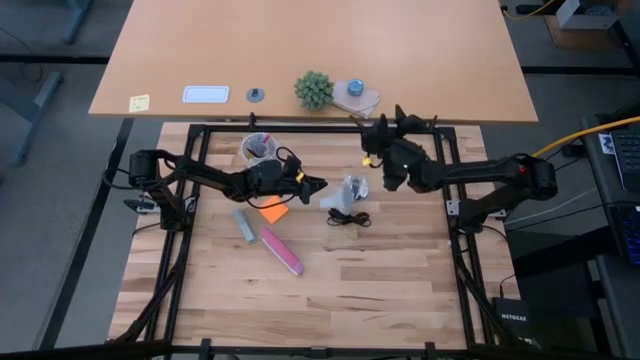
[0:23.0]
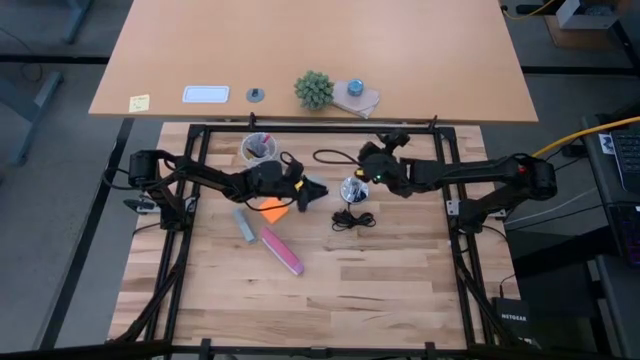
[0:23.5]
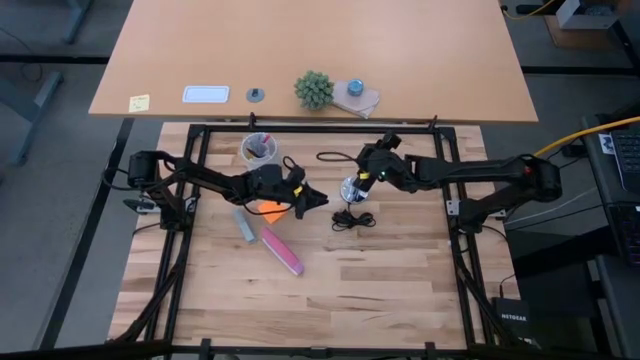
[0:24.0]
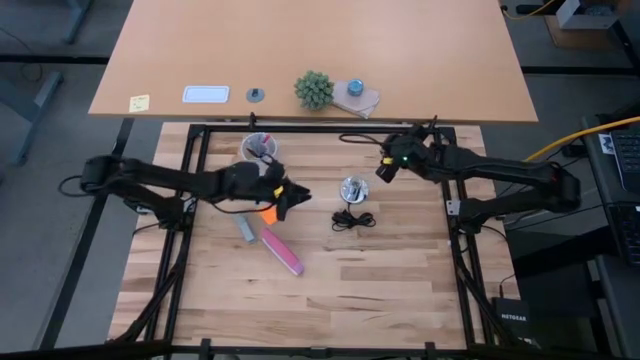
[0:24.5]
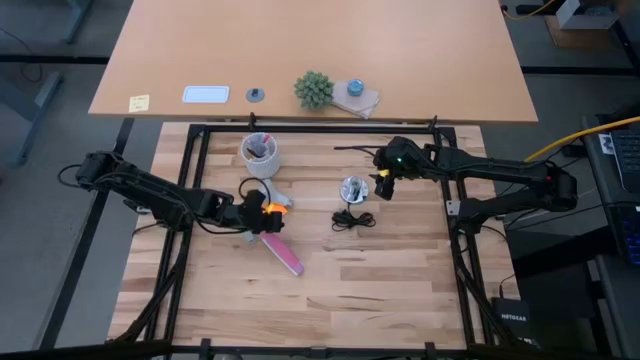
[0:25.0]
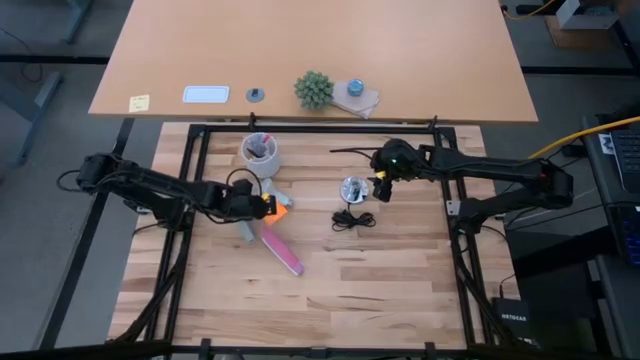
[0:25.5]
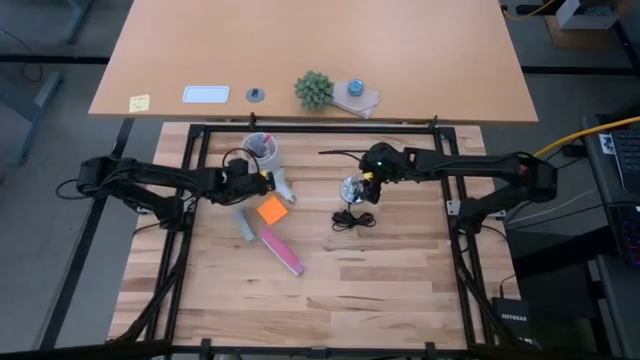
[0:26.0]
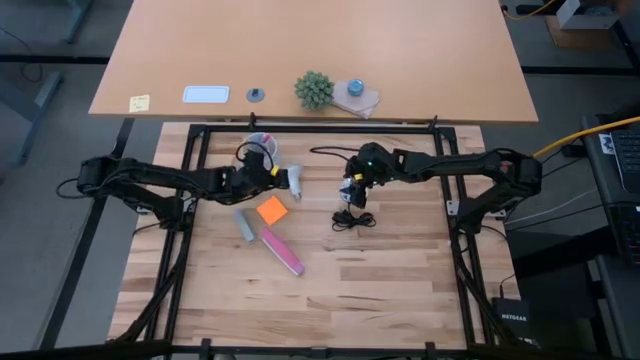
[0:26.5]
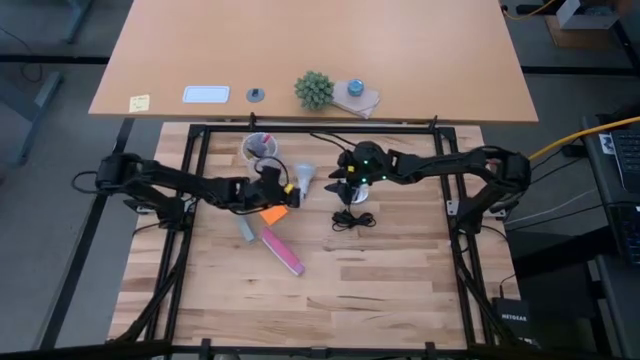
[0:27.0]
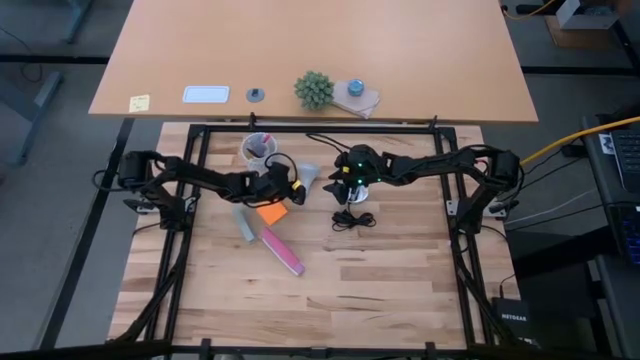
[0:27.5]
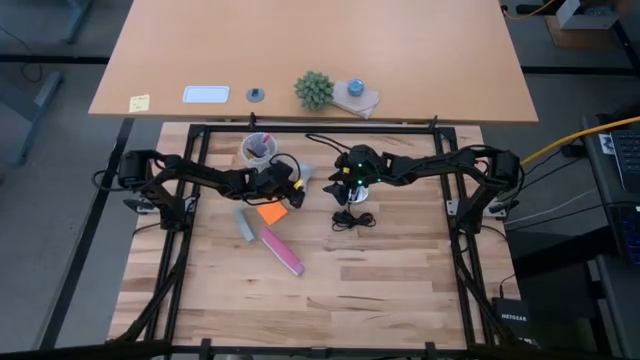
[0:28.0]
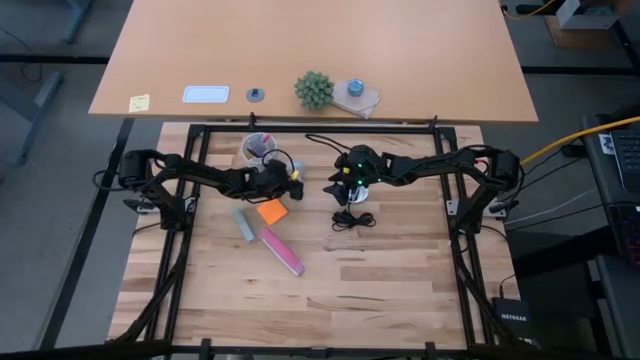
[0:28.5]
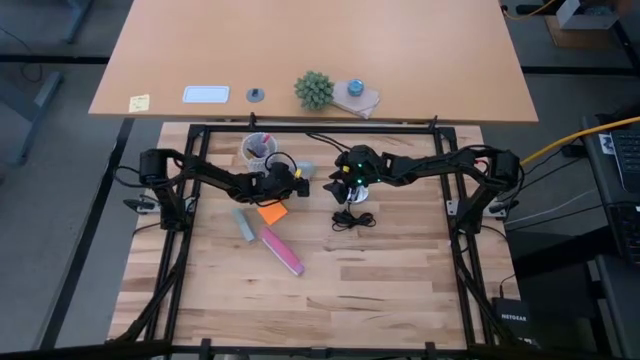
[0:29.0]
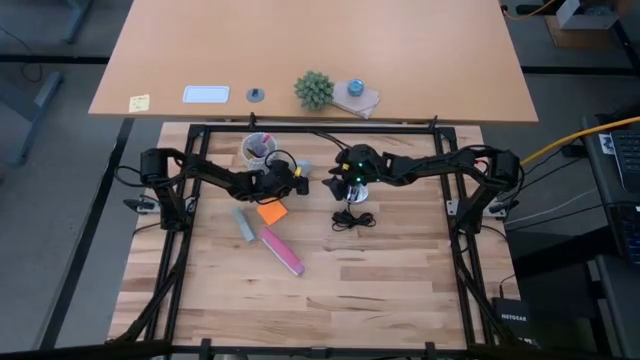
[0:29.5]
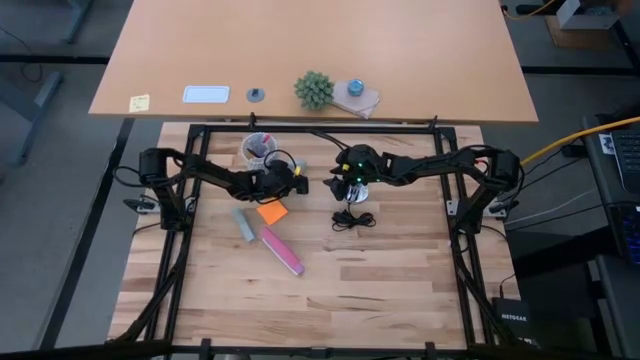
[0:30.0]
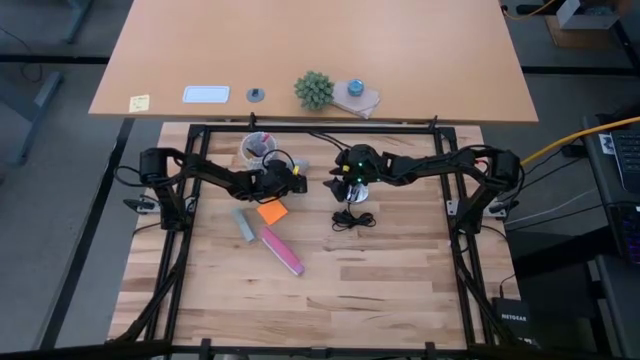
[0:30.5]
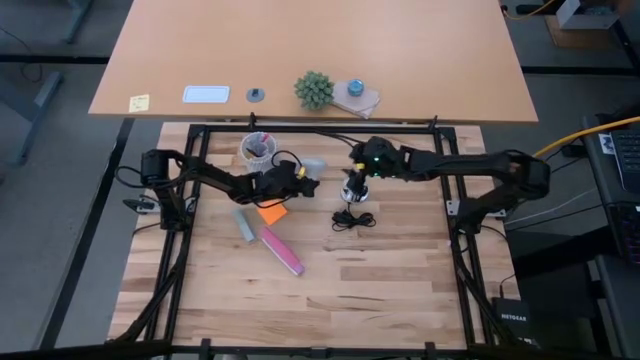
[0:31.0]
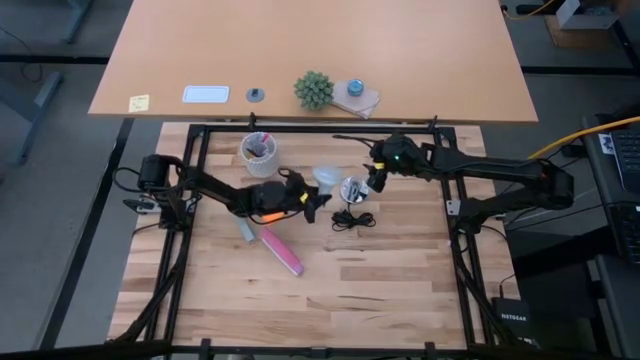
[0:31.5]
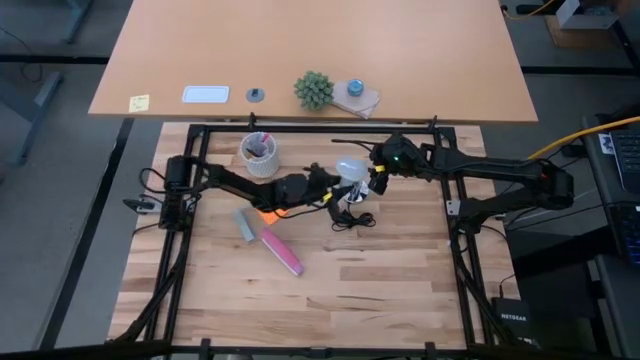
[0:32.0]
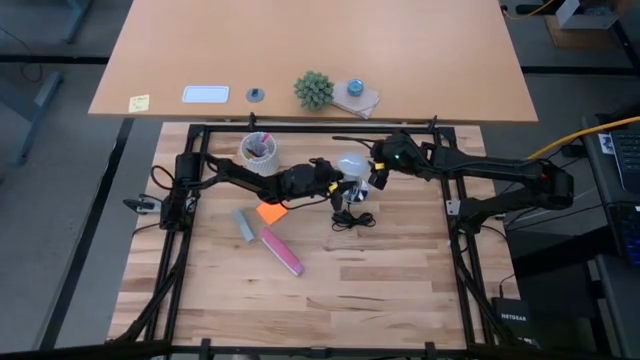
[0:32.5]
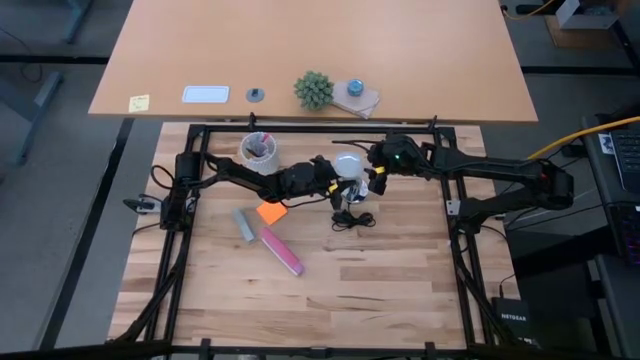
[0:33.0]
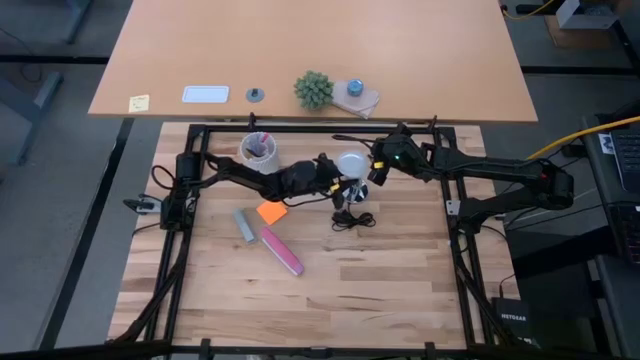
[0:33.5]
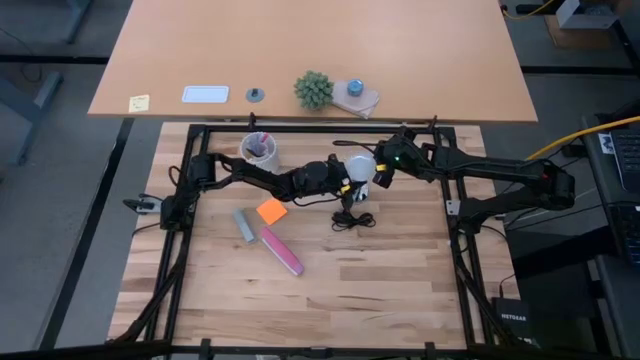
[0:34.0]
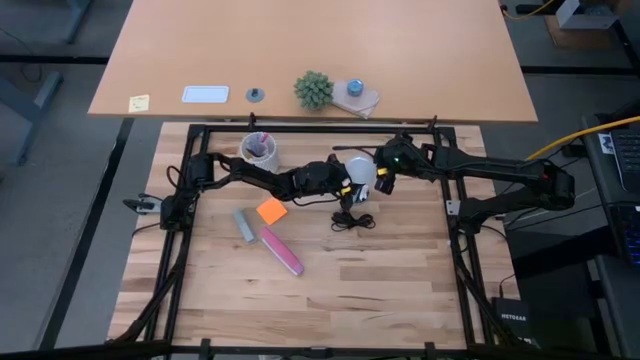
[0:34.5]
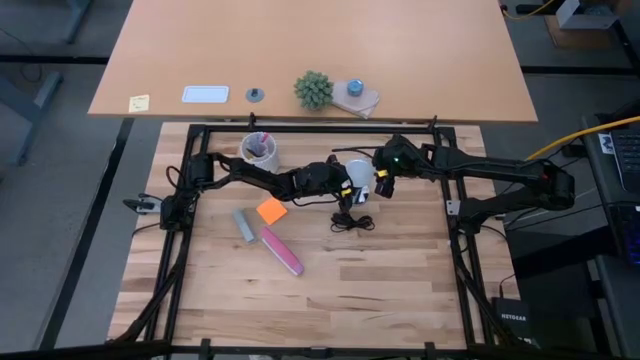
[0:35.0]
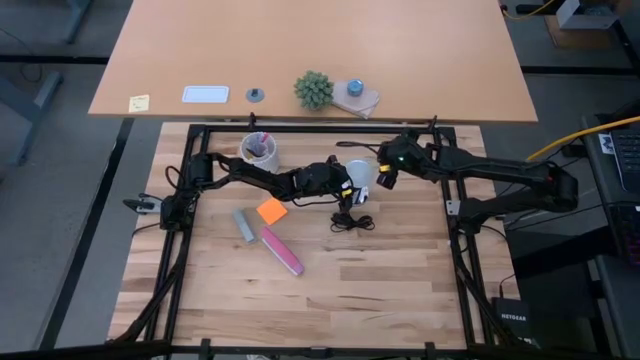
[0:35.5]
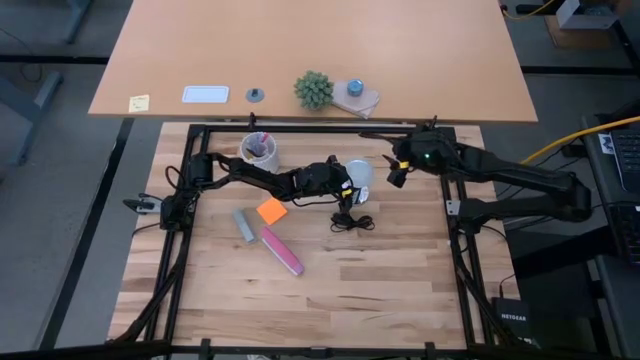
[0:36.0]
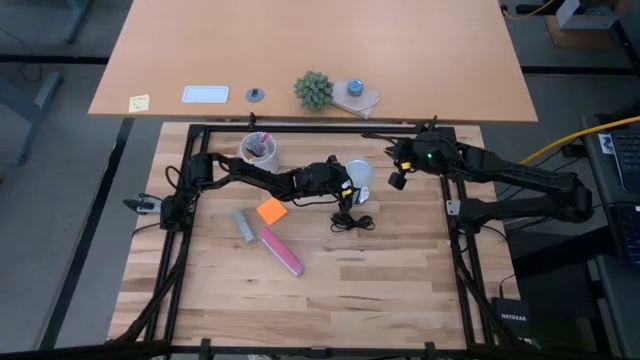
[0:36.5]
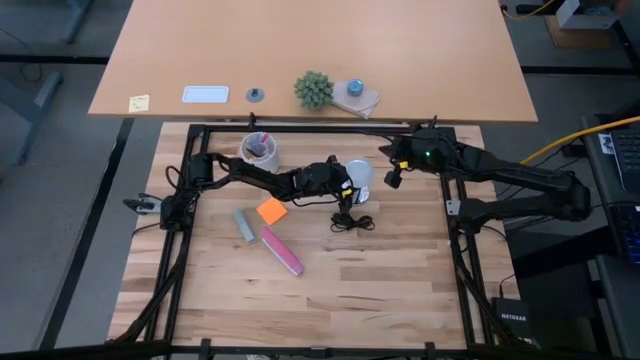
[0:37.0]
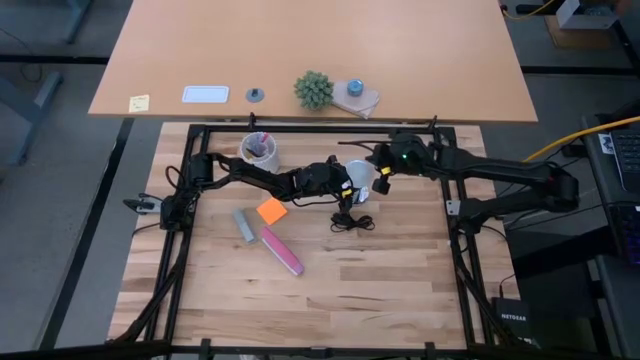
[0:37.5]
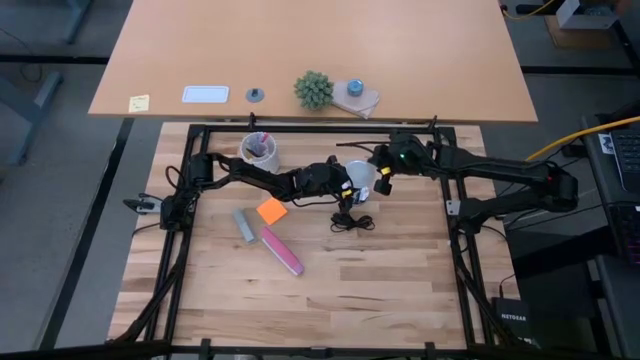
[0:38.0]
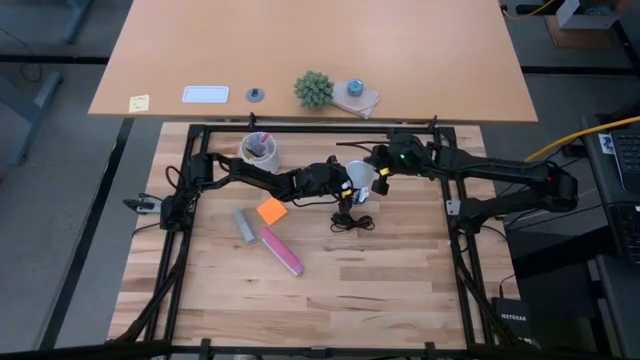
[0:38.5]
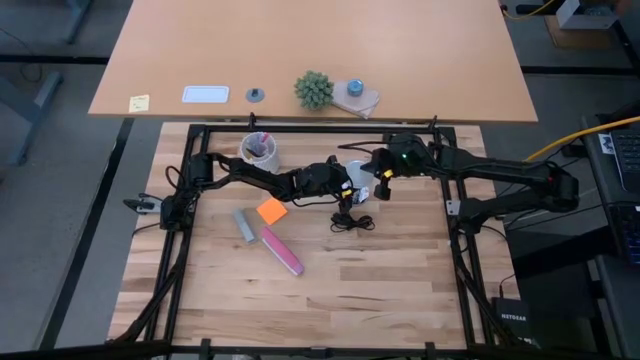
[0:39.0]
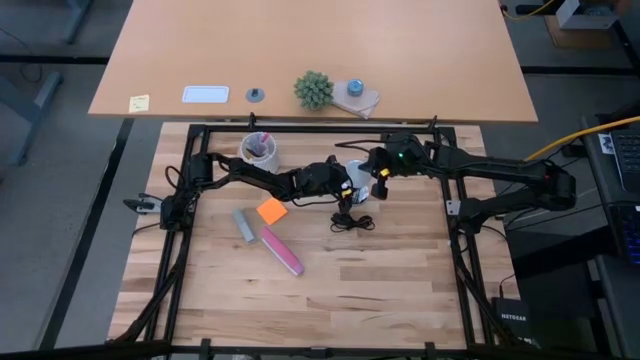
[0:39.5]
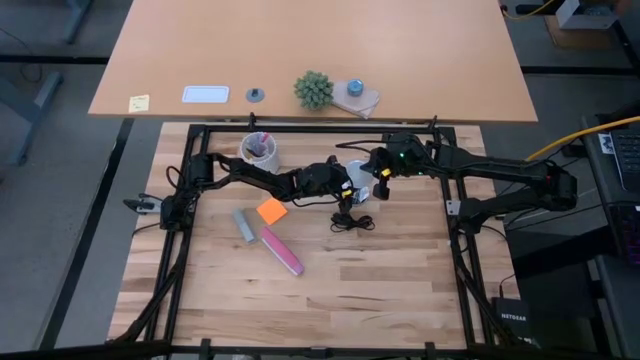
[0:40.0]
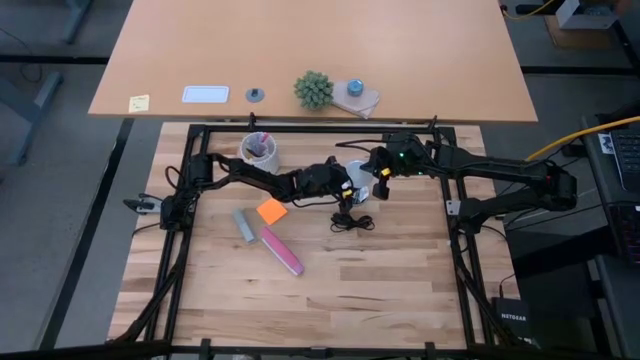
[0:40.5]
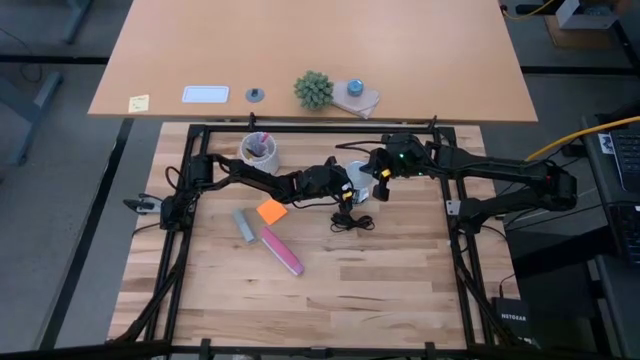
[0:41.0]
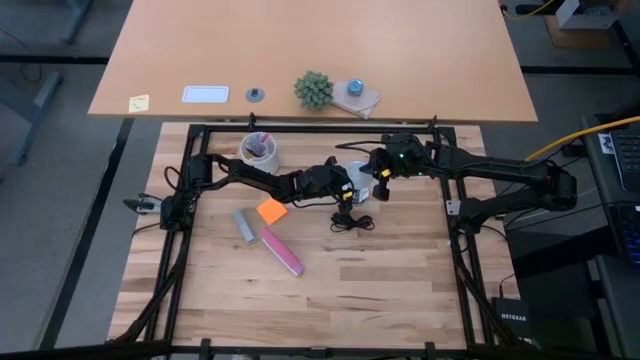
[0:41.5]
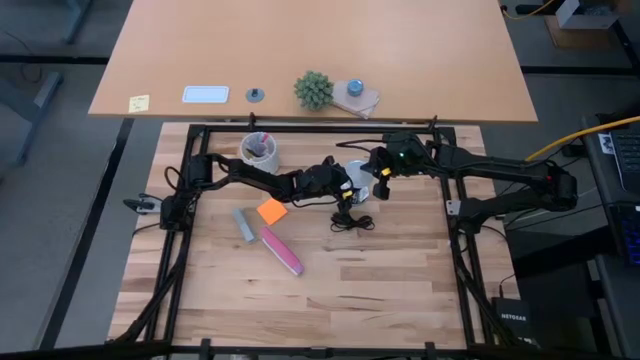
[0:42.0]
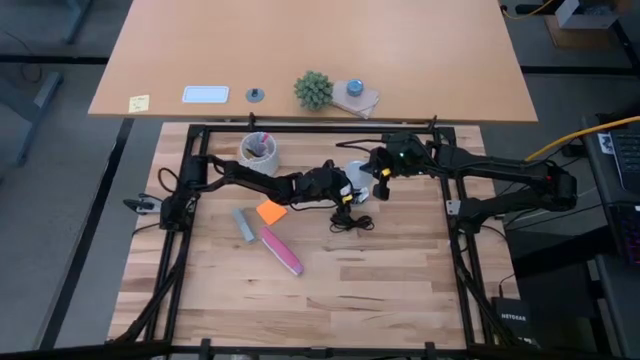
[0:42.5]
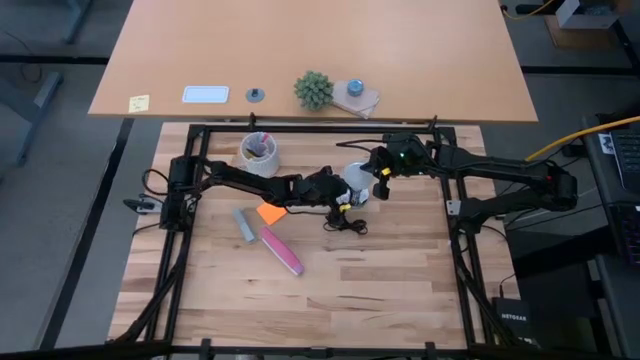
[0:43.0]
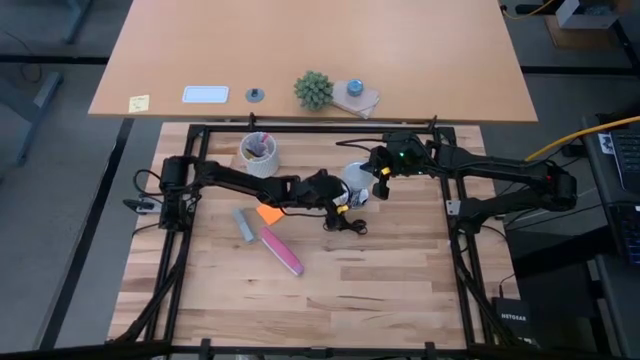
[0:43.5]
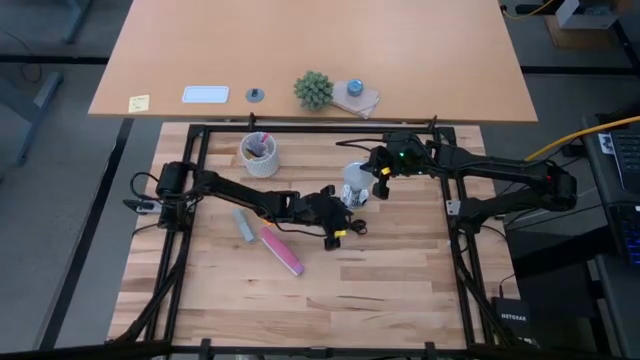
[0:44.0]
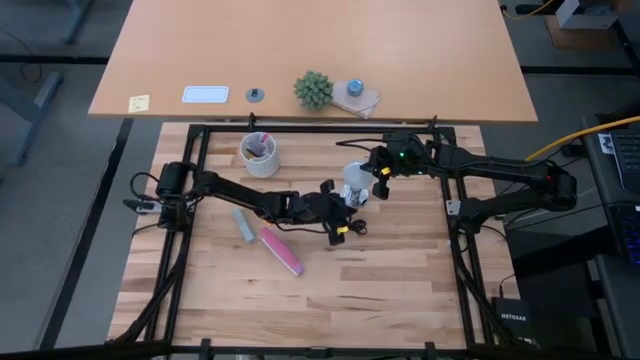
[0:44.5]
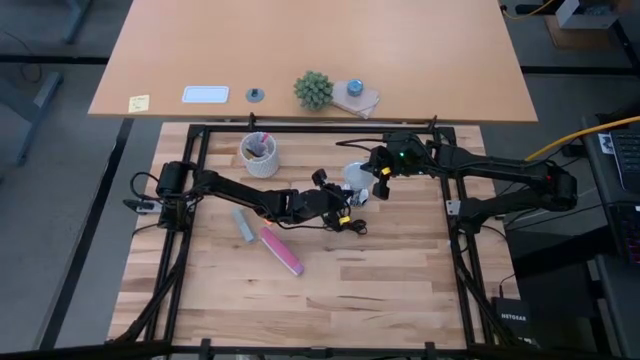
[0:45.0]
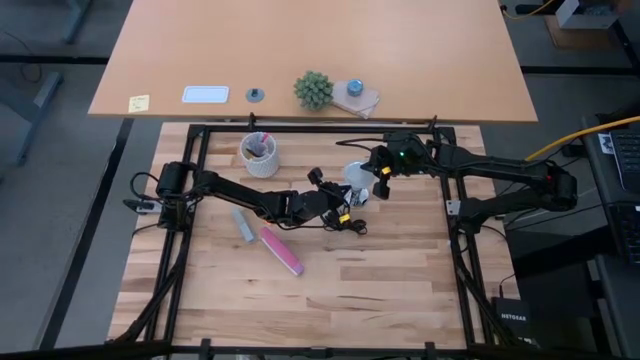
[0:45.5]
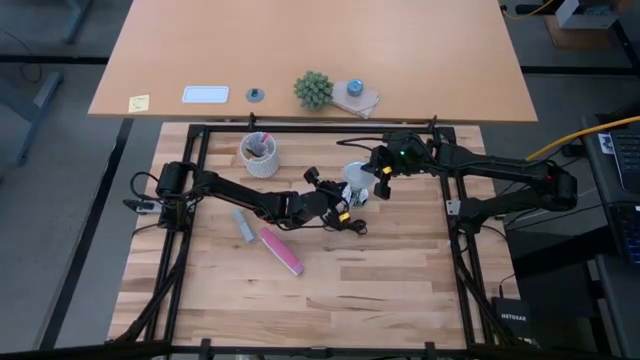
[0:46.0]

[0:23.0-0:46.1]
Task: Screw lightbulb
Insert the lightbulb into the lamp
